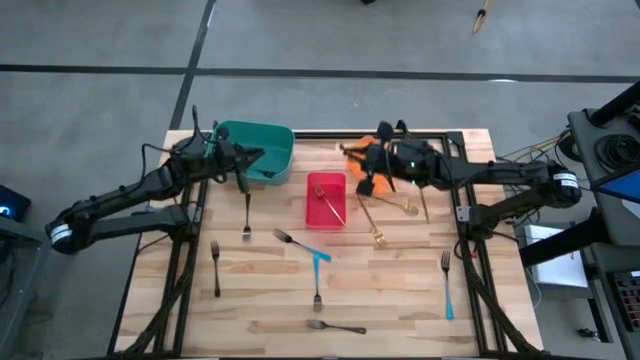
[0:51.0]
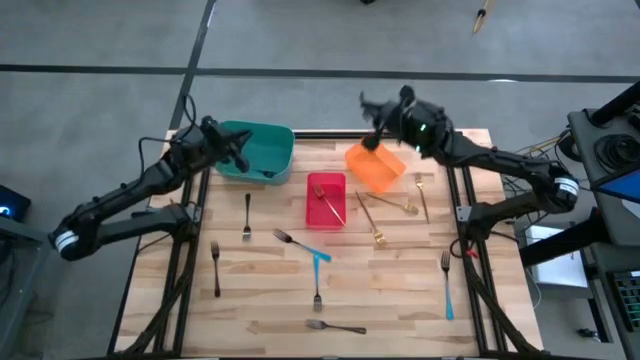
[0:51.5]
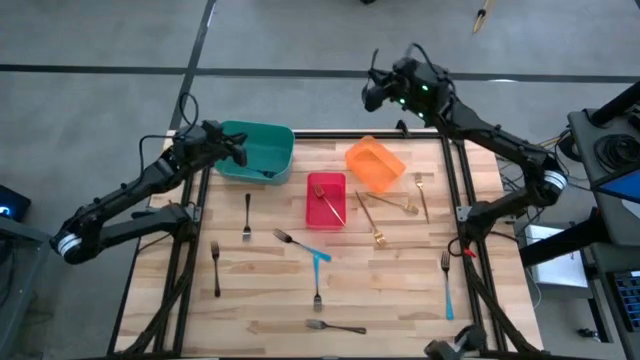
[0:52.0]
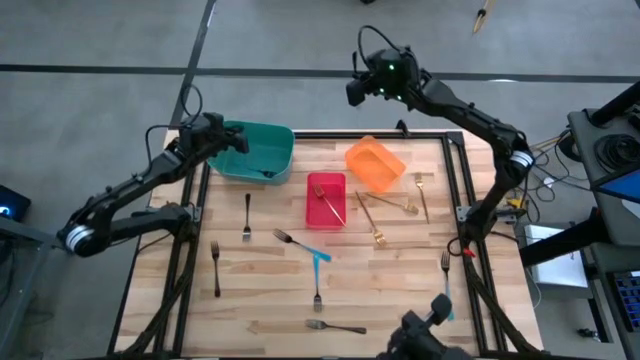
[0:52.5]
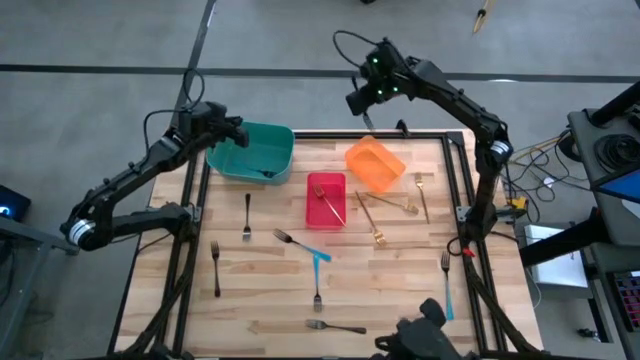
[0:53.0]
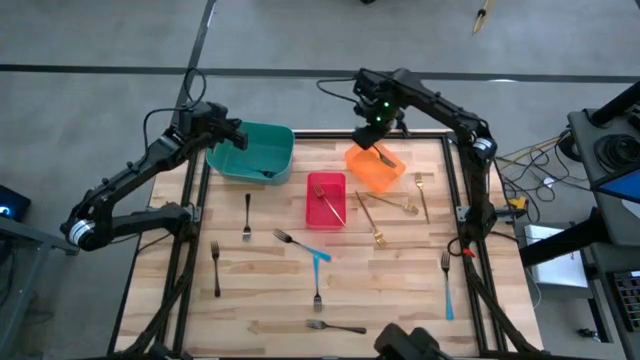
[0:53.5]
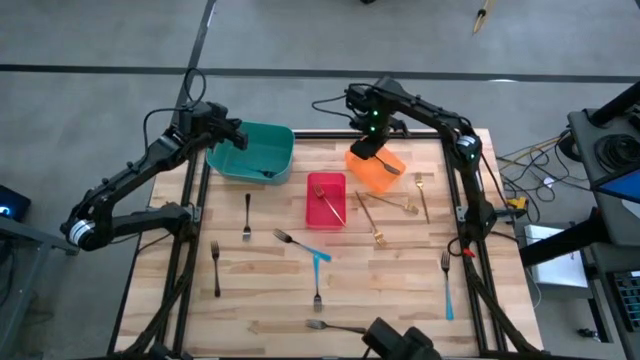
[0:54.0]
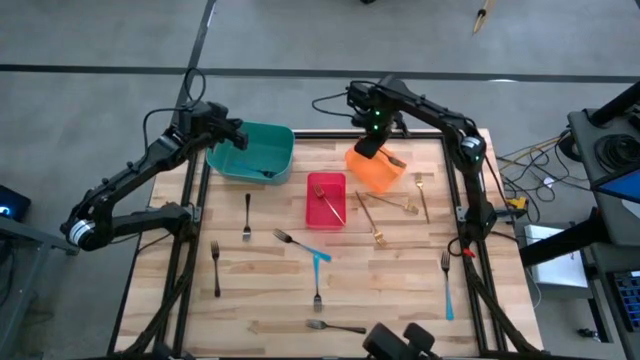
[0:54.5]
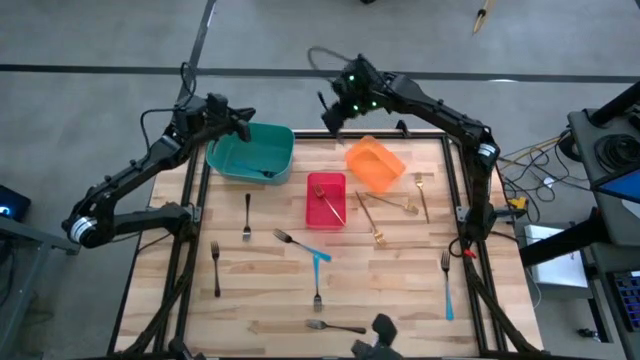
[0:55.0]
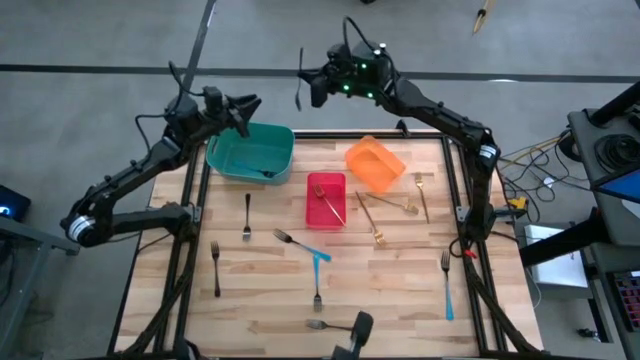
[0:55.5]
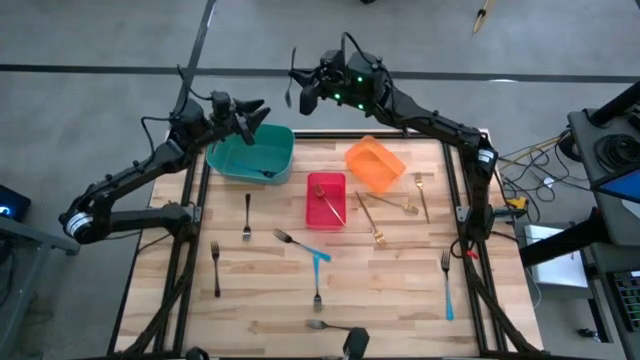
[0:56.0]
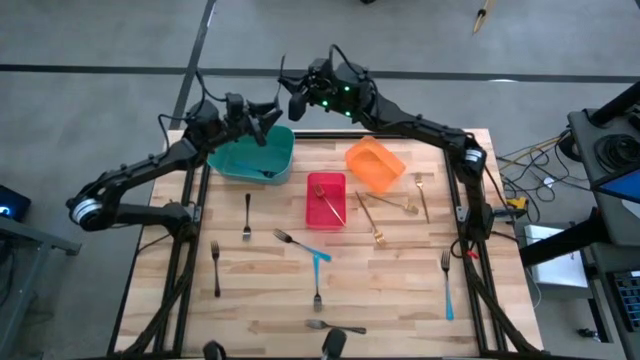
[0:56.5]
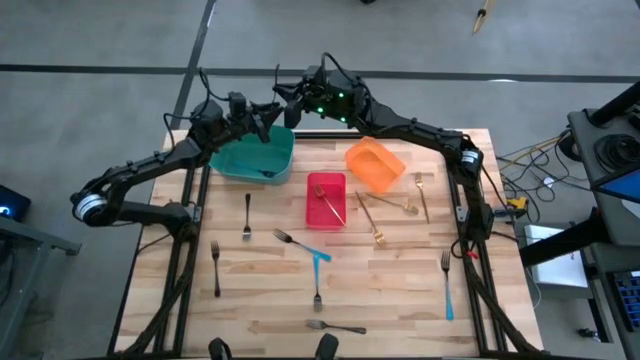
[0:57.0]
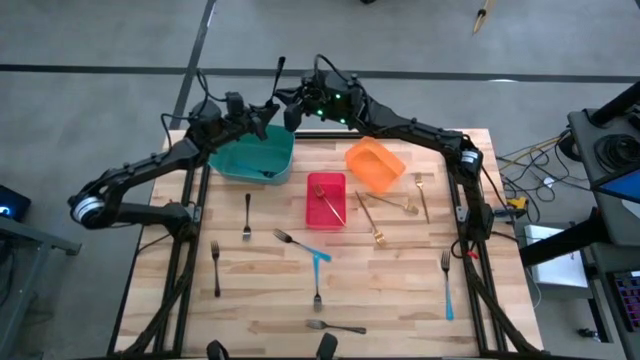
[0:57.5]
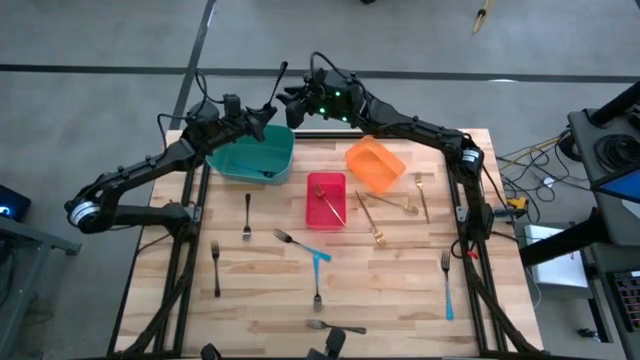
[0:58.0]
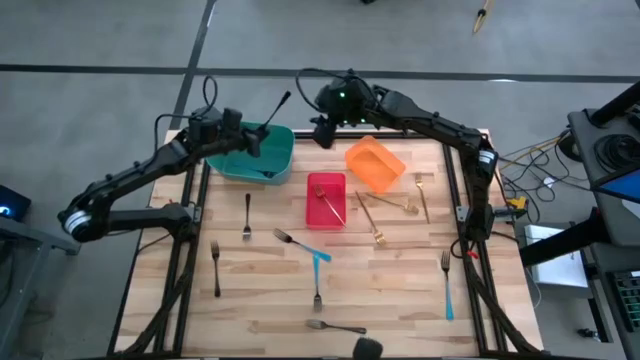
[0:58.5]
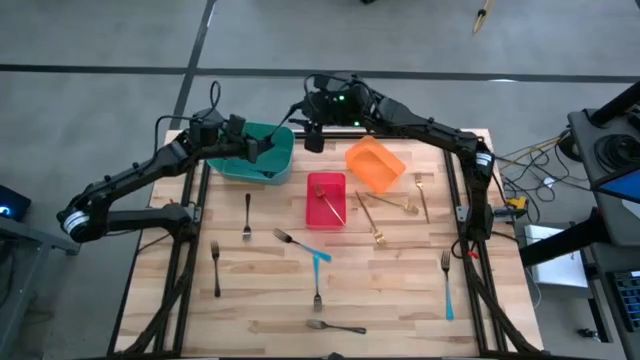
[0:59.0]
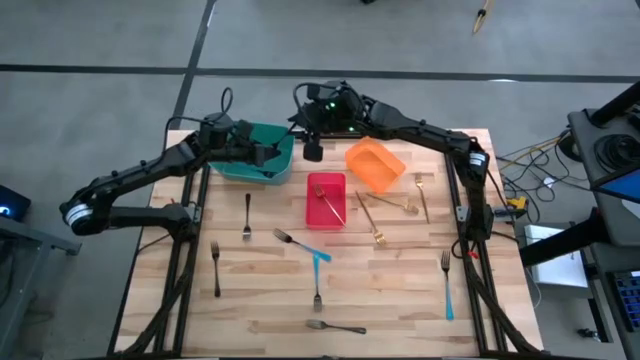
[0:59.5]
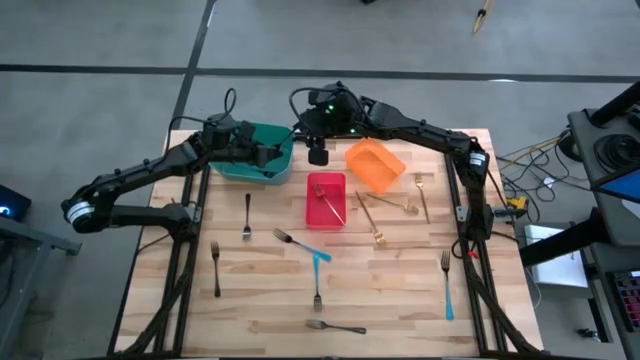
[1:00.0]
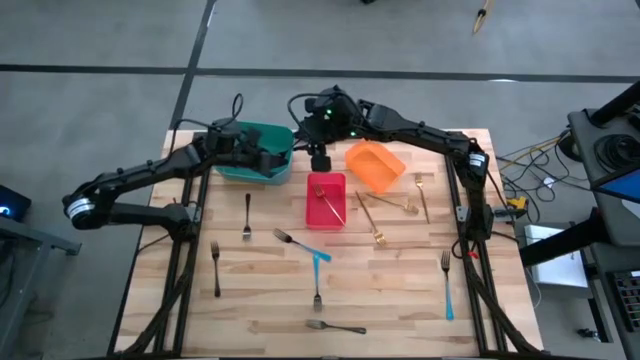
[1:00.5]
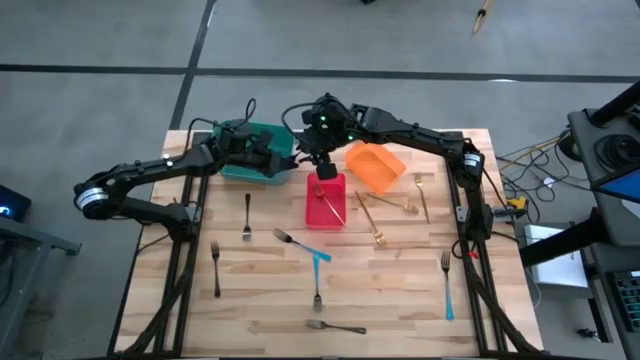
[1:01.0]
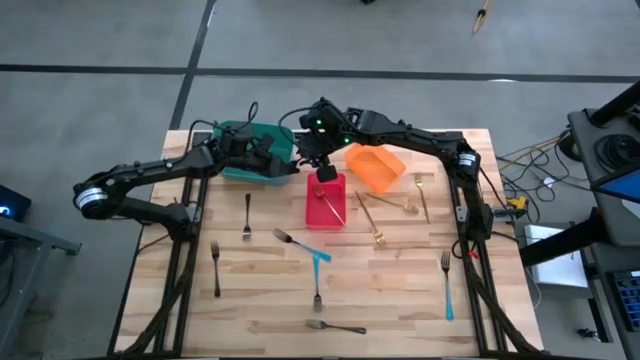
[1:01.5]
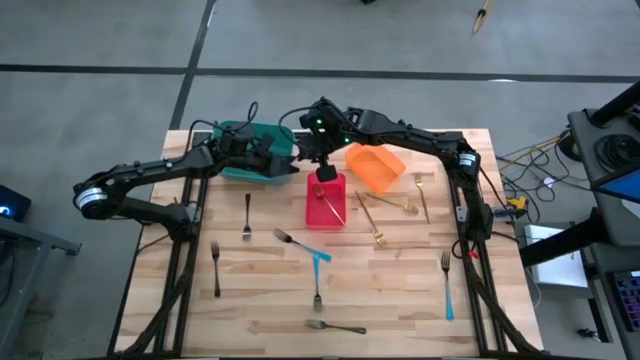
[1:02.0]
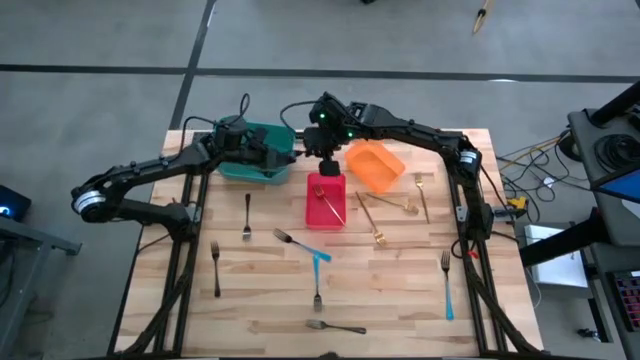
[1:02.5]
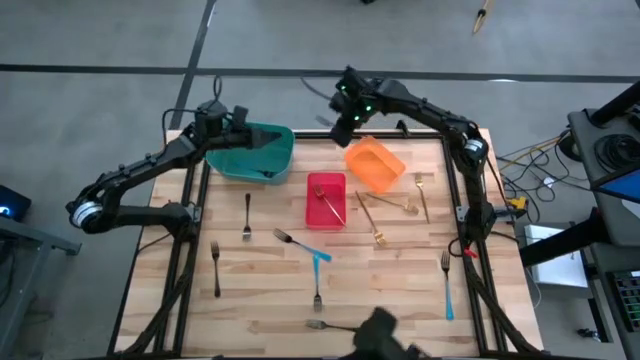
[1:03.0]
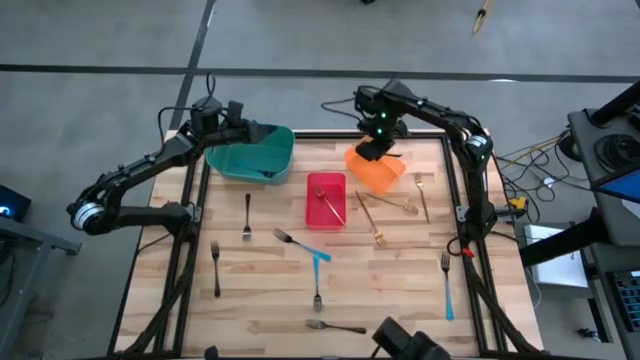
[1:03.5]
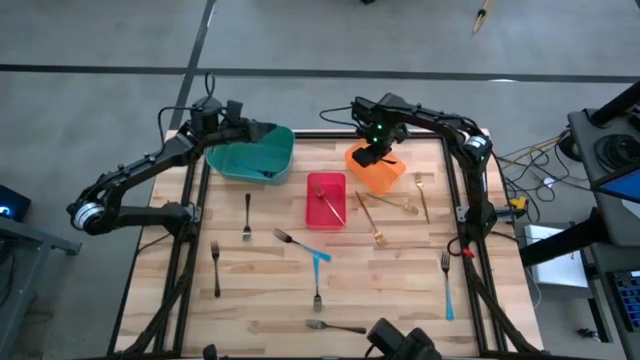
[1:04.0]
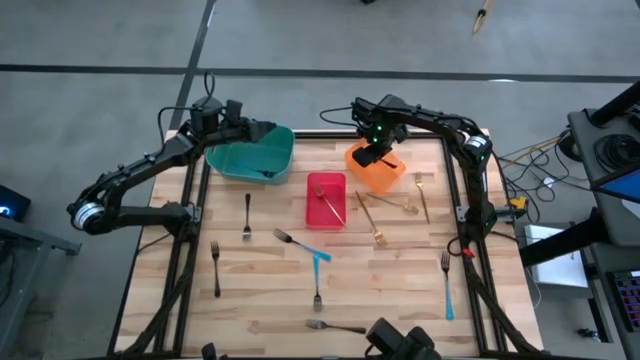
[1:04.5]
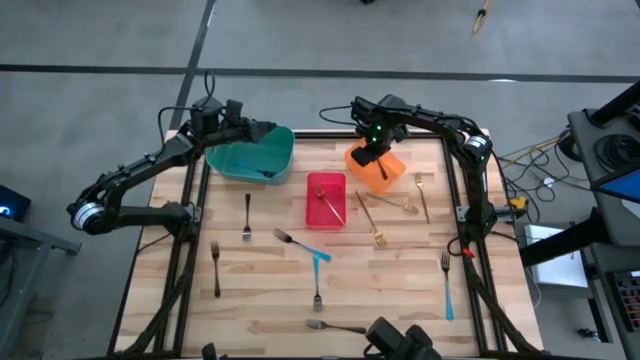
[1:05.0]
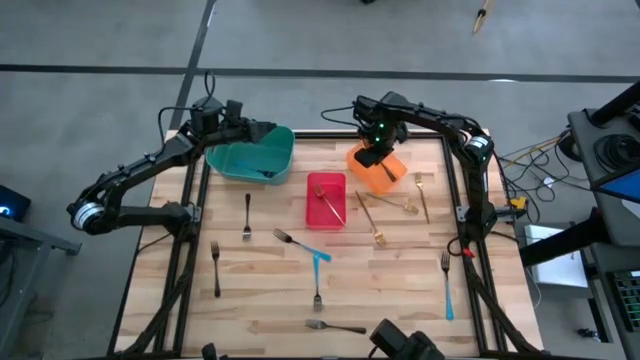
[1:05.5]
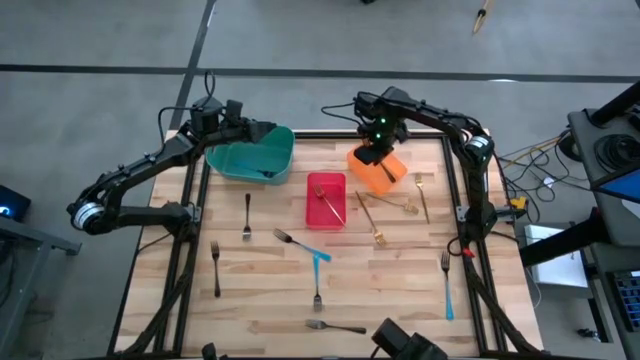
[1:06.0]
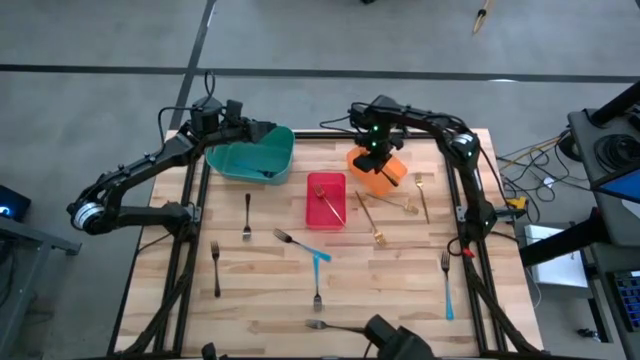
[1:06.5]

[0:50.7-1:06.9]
Task: Sort silverware by color (type)
Put the black fork into the orange bin

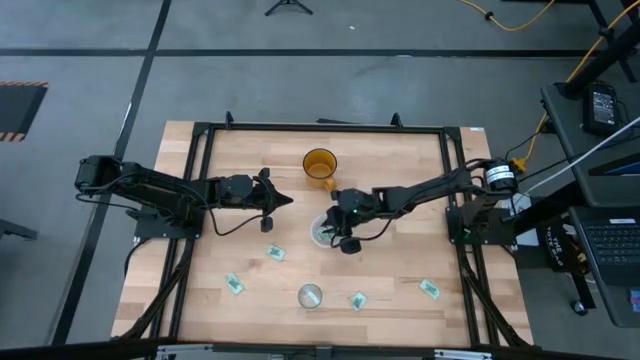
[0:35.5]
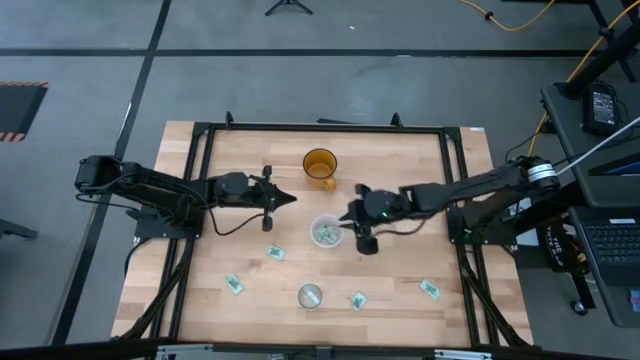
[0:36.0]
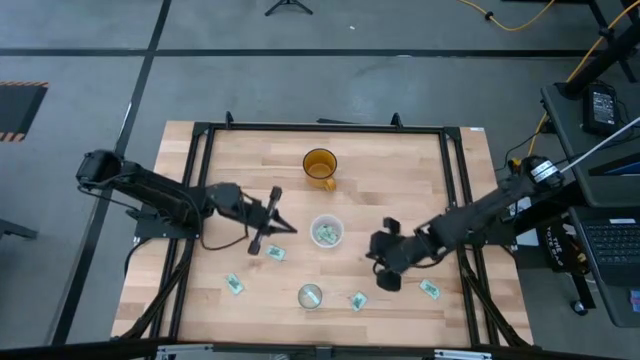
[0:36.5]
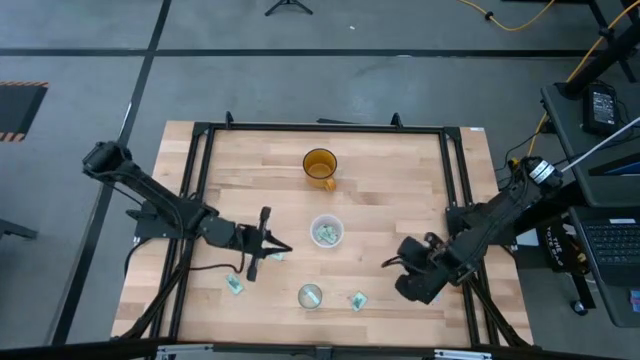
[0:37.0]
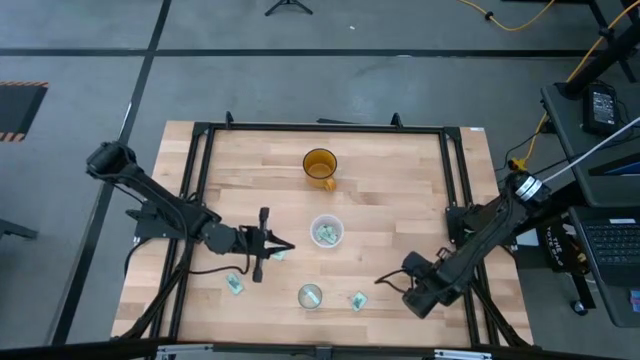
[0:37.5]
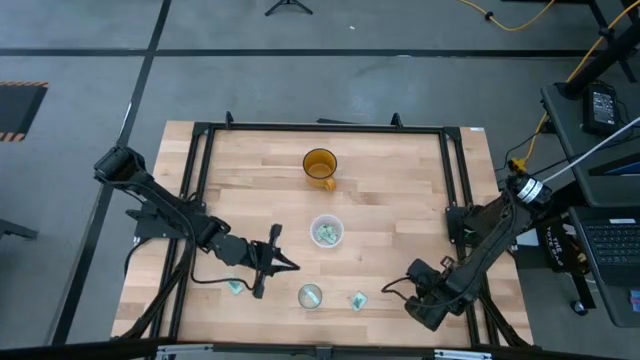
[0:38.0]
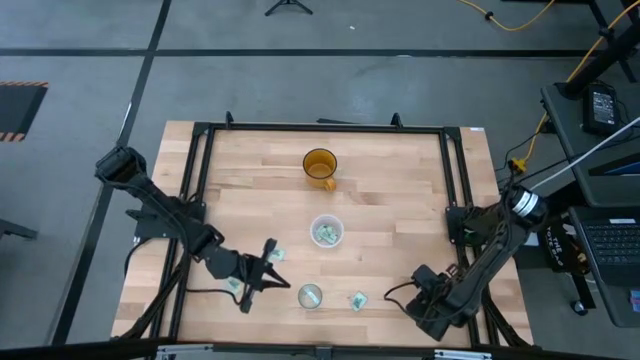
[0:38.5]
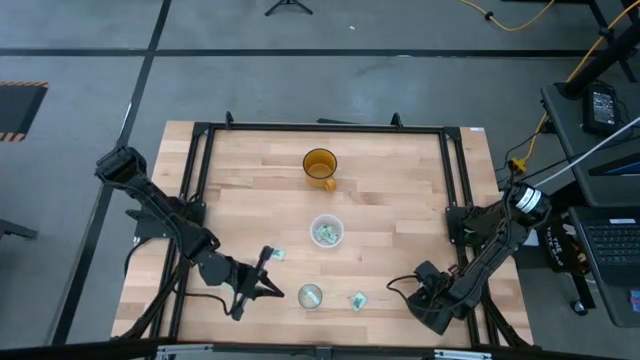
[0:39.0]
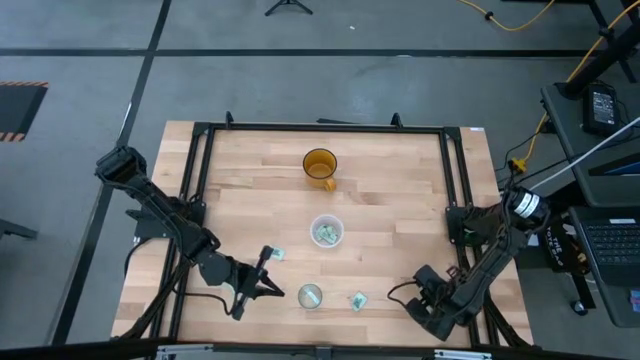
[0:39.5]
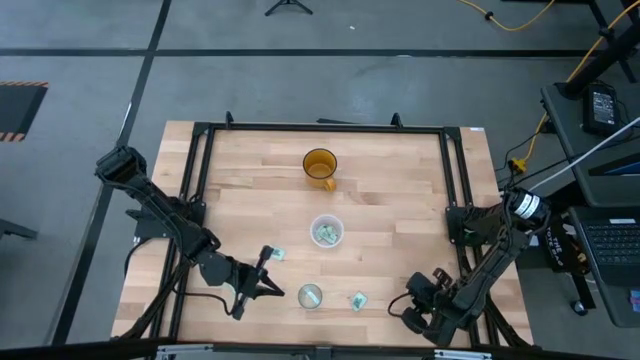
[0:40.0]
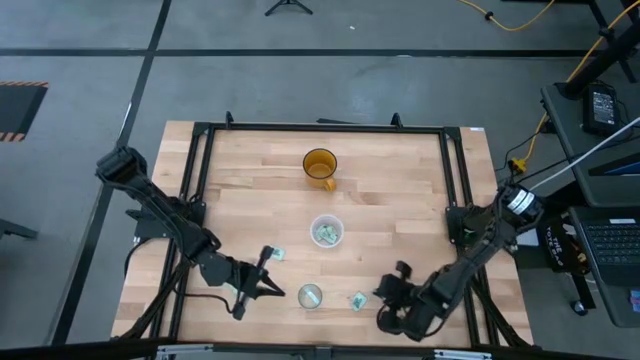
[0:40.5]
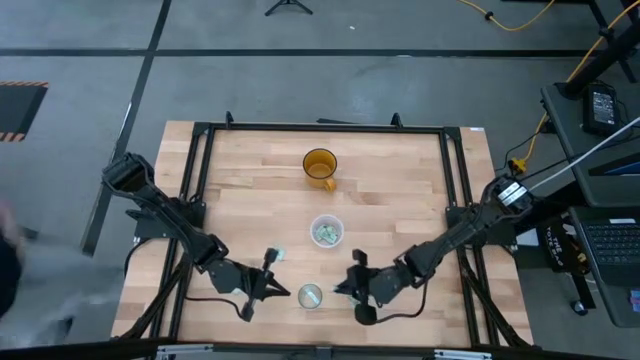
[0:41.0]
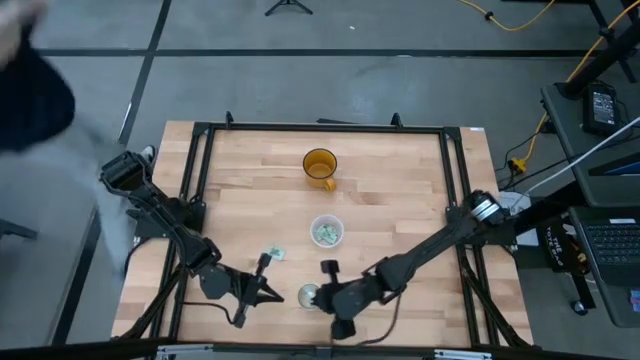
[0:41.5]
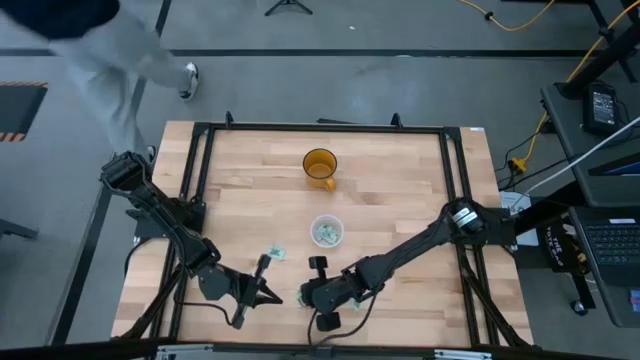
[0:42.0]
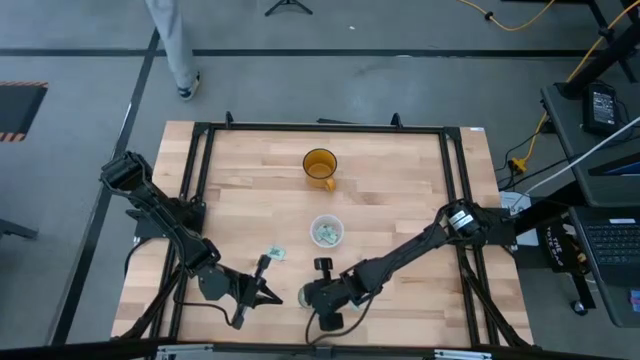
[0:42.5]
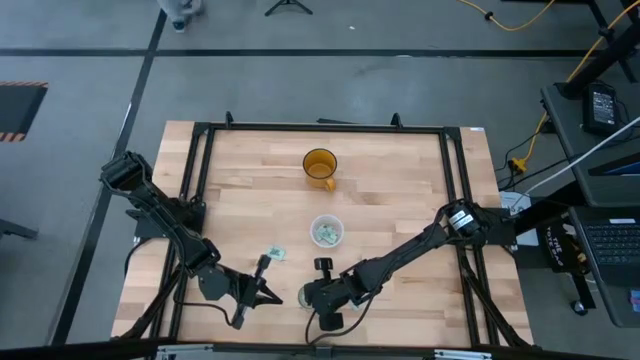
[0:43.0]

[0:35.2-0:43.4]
Task: Pick and place Stevia / Truvia into bins
Put the stevia packet into the transparent glass container
